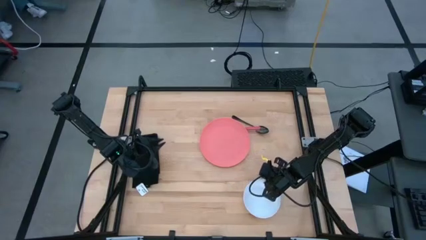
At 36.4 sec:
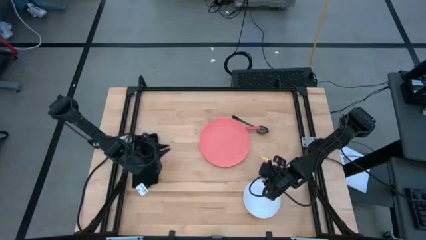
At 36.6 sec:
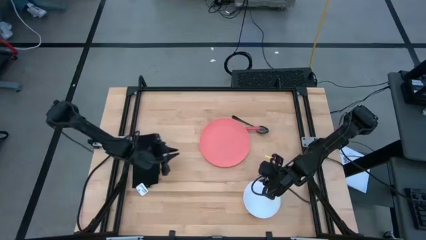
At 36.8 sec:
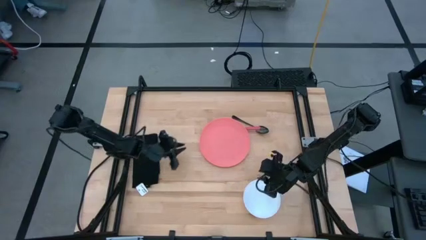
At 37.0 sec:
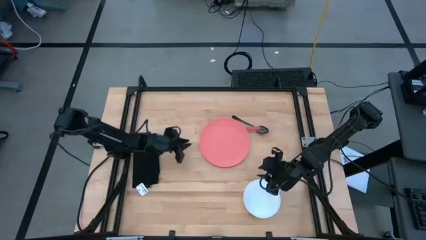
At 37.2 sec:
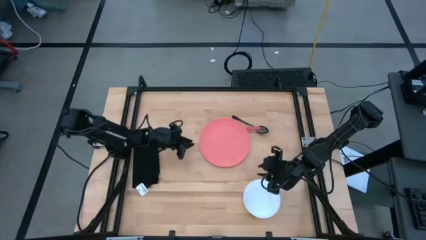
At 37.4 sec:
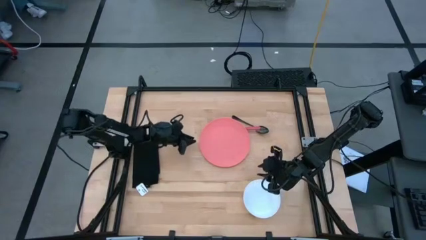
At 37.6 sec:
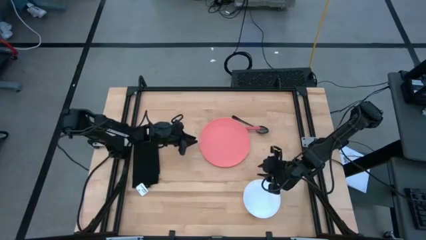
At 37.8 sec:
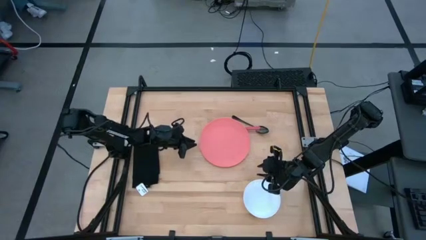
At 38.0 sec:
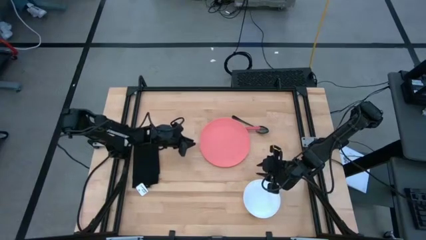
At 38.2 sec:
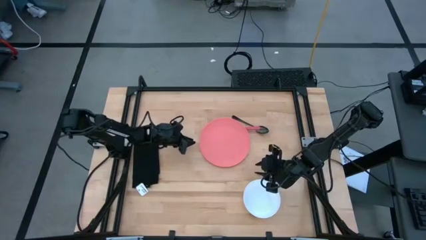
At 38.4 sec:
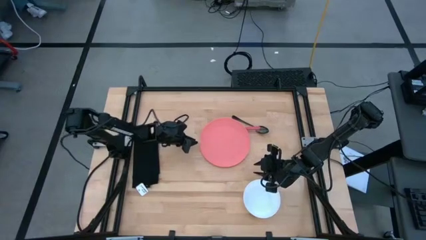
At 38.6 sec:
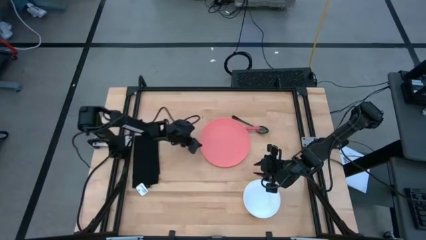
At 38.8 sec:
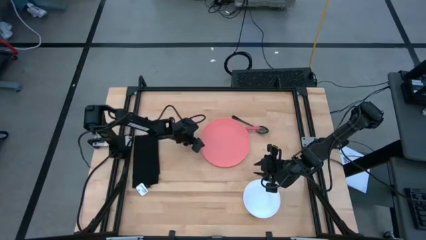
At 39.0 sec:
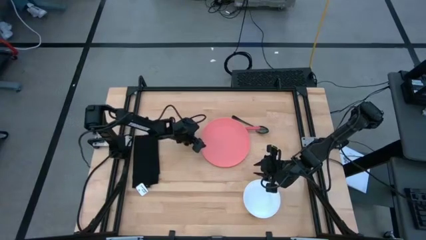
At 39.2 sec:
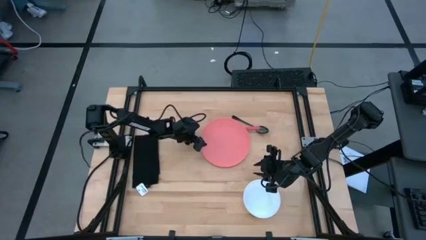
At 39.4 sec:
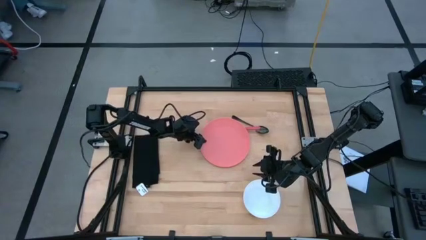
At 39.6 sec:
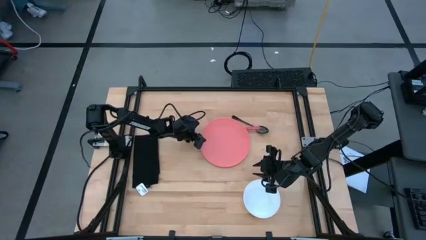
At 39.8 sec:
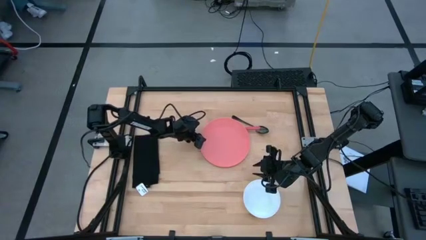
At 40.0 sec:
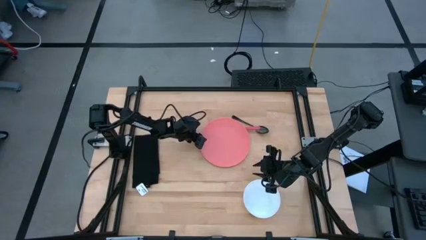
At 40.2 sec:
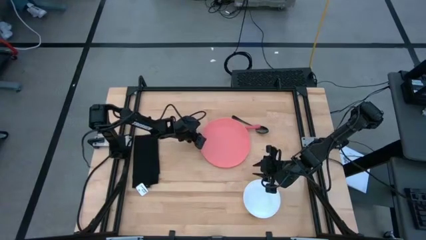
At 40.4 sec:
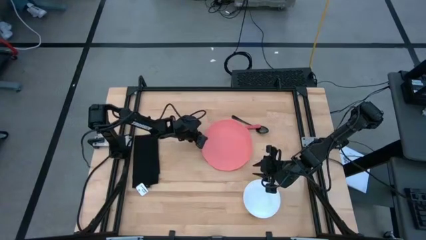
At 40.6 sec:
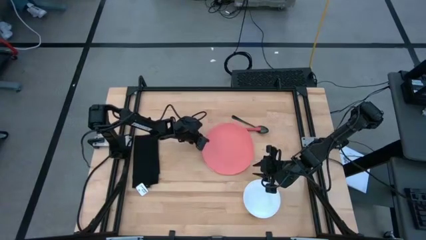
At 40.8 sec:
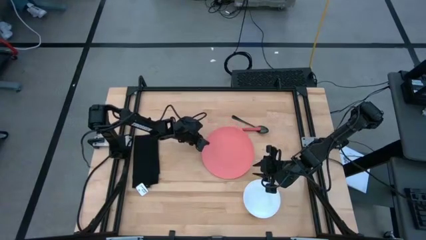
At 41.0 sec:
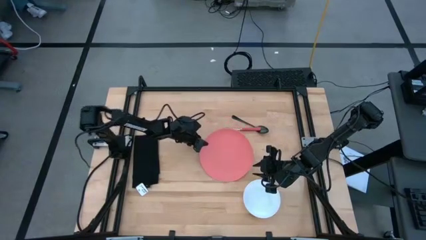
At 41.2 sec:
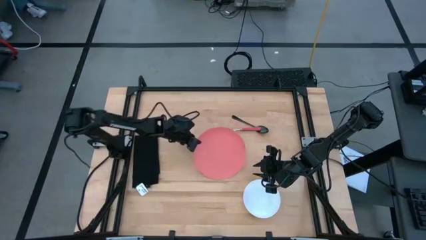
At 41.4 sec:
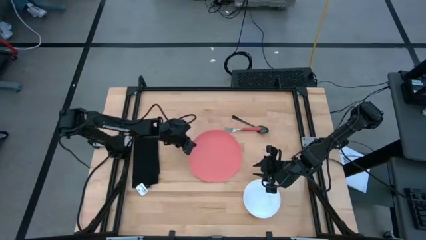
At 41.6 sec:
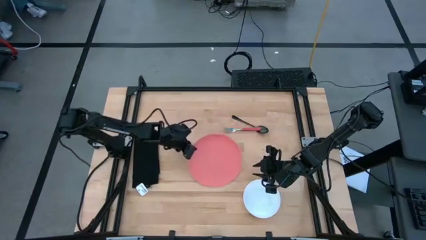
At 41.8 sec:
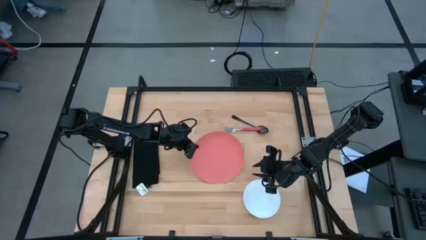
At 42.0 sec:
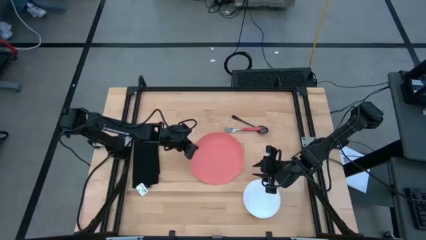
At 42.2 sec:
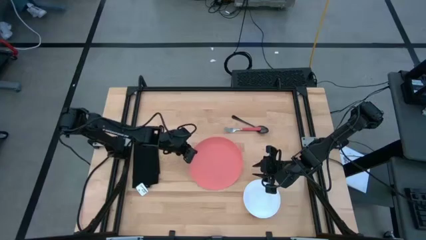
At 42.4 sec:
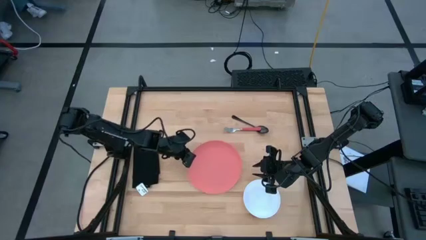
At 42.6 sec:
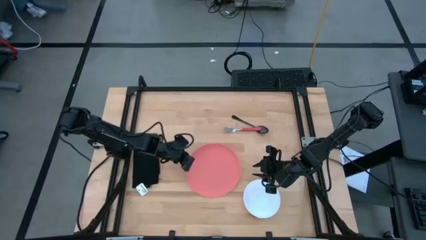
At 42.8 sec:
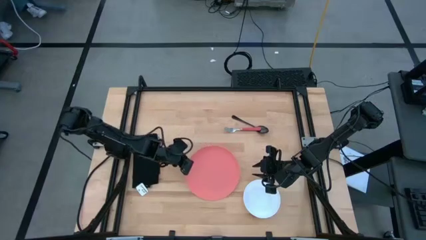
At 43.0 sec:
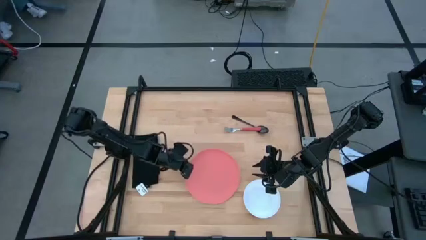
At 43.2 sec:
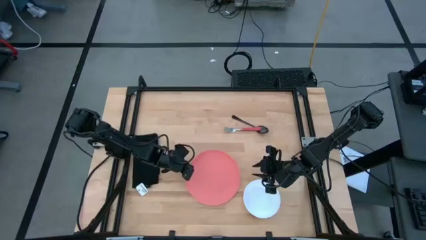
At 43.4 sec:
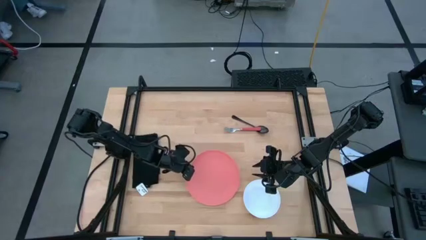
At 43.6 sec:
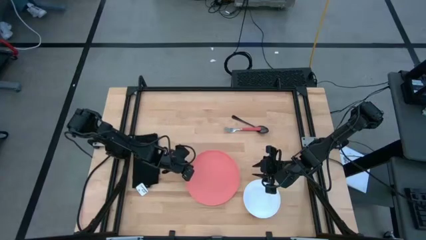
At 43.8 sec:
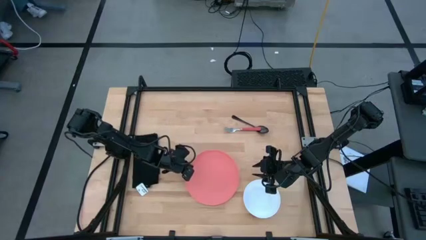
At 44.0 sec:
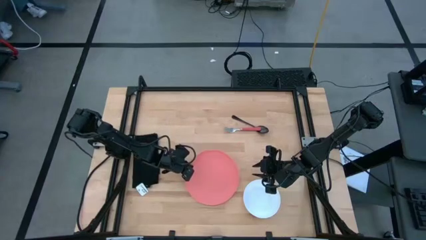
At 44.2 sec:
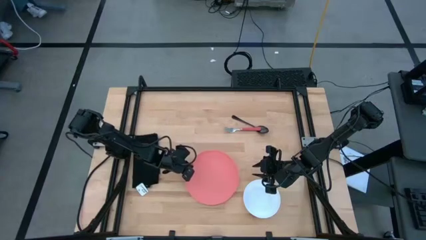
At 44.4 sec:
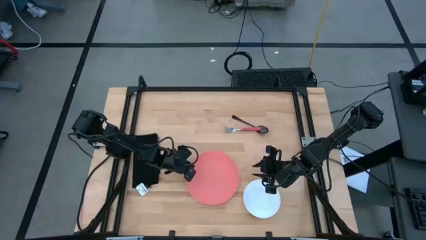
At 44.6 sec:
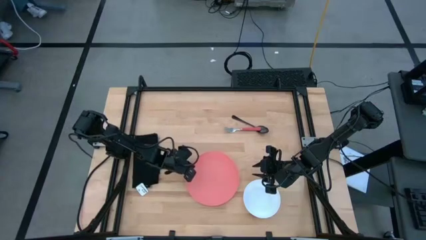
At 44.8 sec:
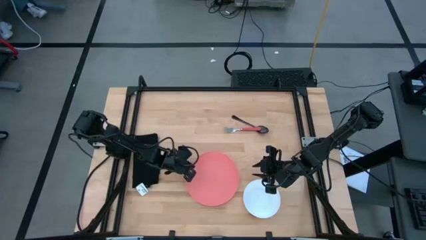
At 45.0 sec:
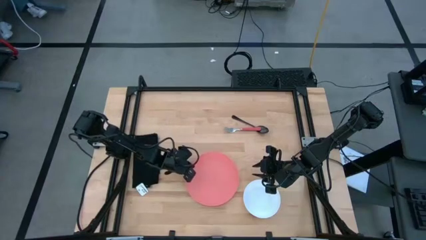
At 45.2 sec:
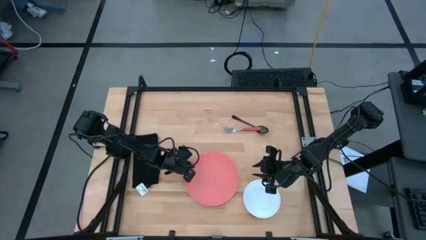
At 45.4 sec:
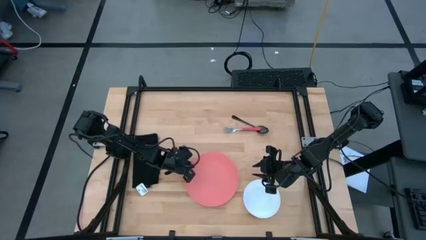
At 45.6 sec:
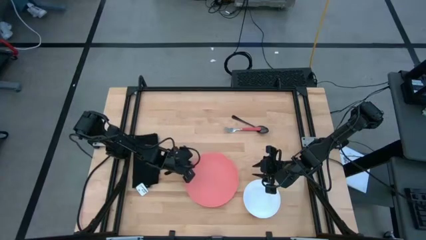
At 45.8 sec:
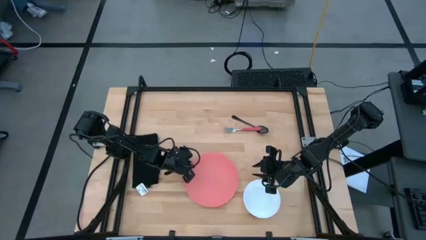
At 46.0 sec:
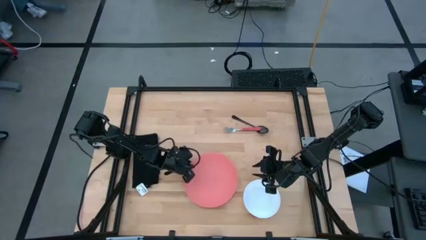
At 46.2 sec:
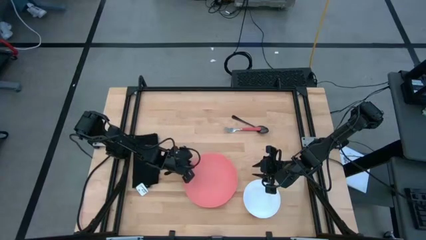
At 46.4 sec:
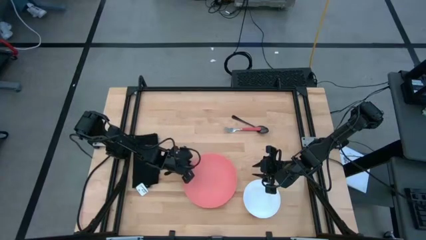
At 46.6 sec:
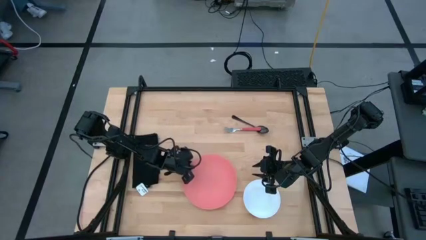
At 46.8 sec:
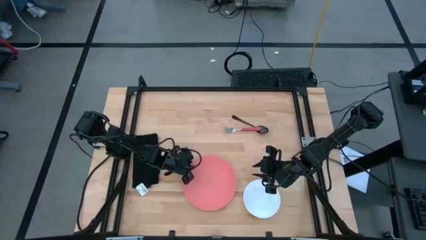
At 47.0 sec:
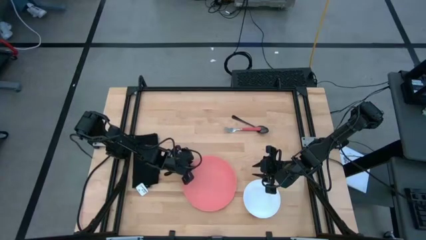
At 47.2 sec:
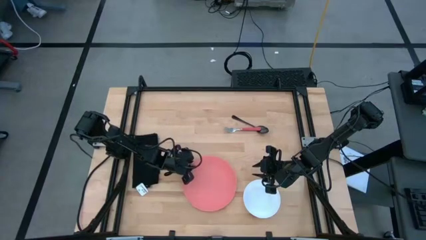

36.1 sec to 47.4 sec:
Task: Set table place
Move the pink plate to the center of the table
